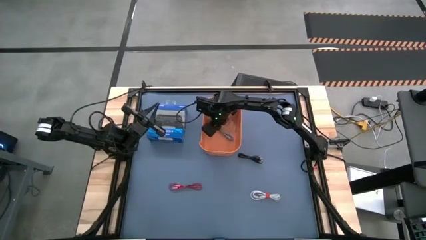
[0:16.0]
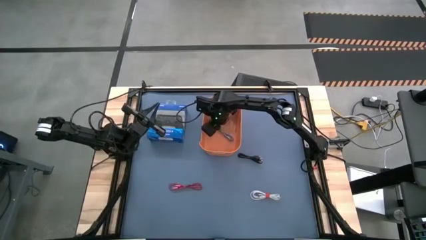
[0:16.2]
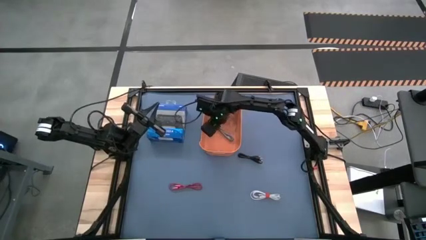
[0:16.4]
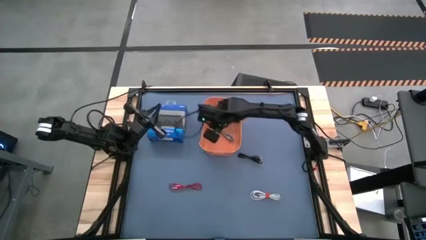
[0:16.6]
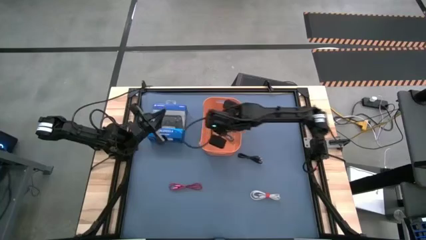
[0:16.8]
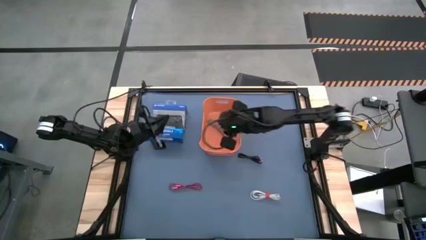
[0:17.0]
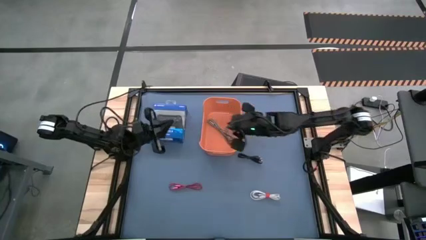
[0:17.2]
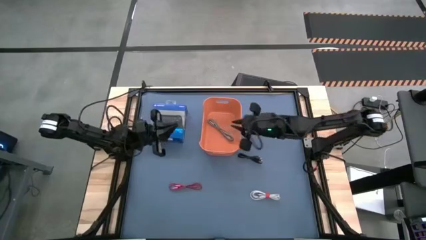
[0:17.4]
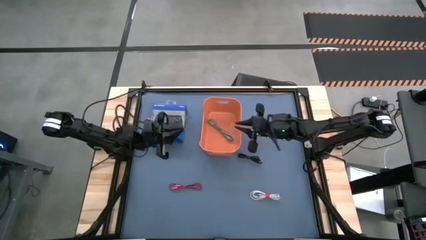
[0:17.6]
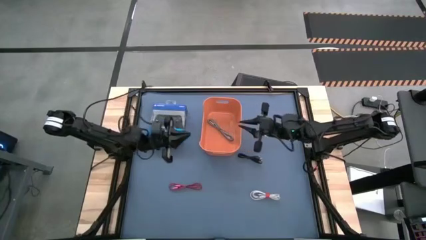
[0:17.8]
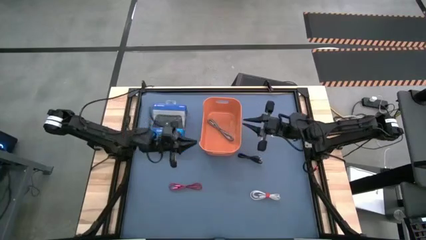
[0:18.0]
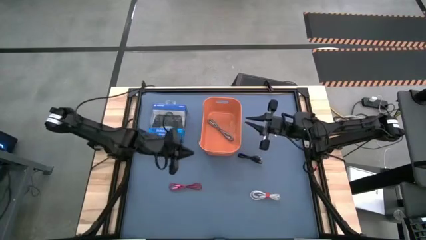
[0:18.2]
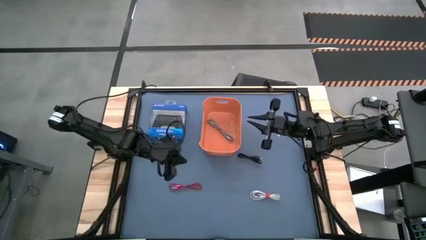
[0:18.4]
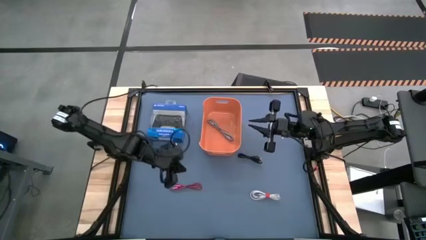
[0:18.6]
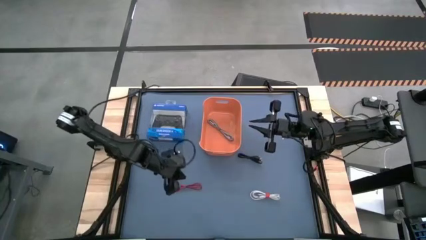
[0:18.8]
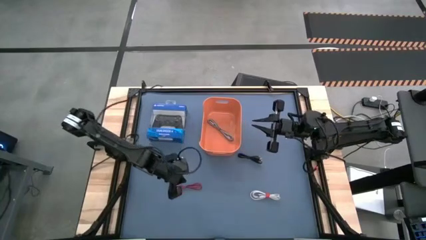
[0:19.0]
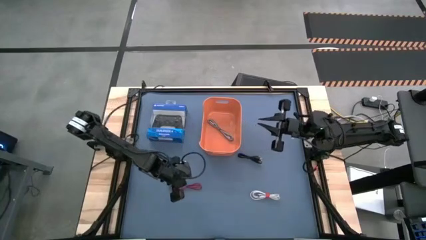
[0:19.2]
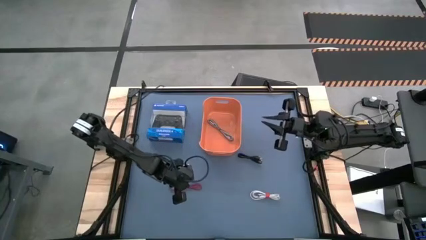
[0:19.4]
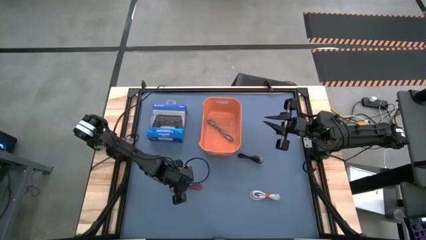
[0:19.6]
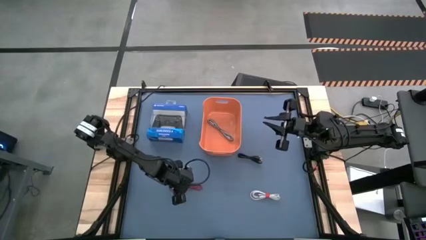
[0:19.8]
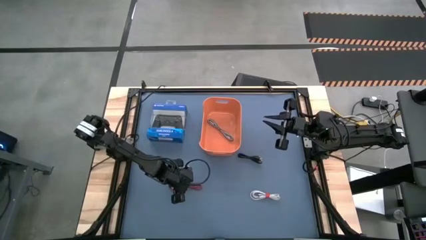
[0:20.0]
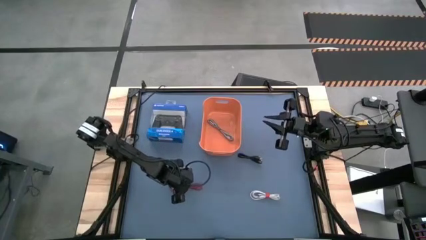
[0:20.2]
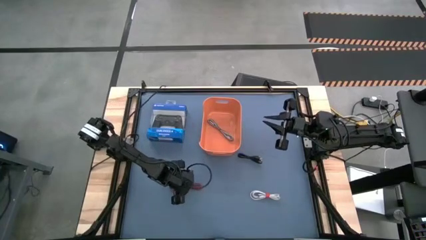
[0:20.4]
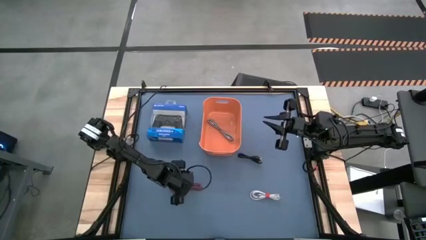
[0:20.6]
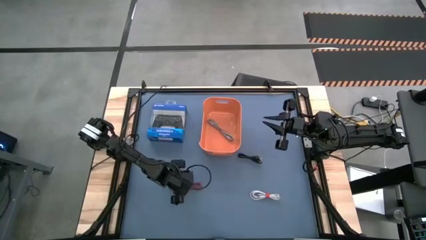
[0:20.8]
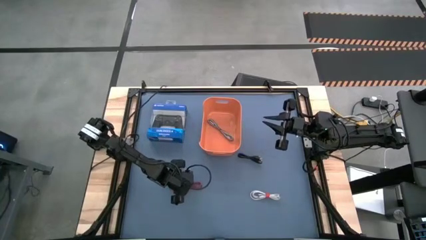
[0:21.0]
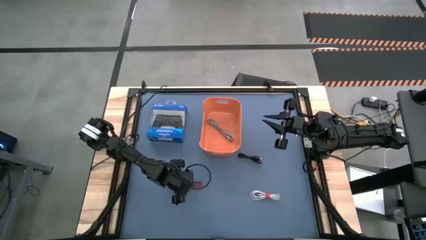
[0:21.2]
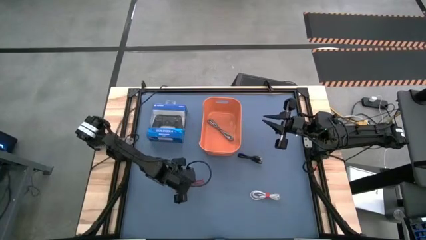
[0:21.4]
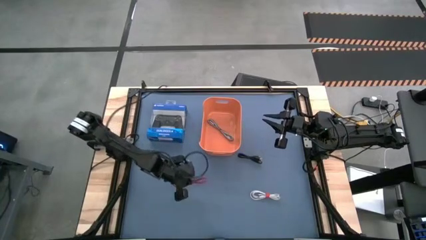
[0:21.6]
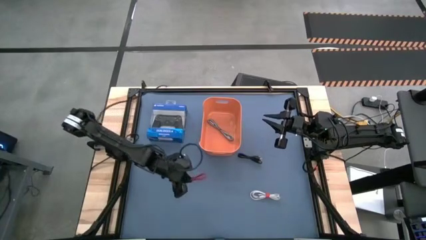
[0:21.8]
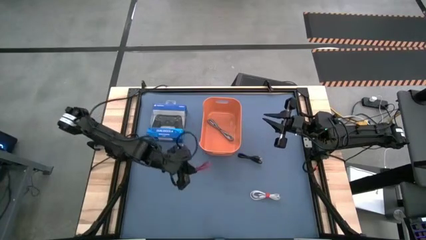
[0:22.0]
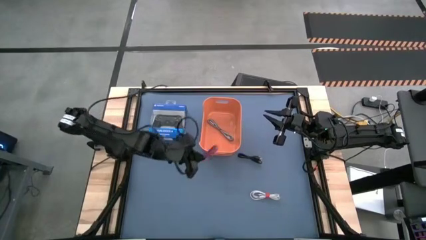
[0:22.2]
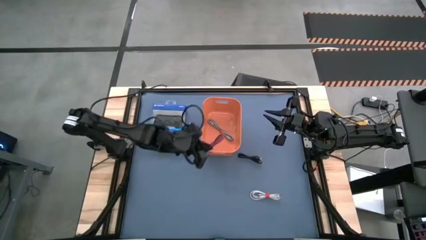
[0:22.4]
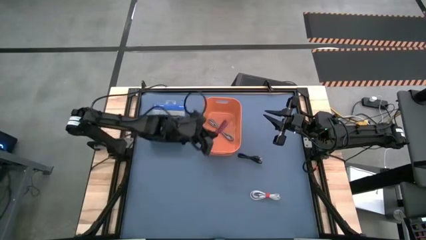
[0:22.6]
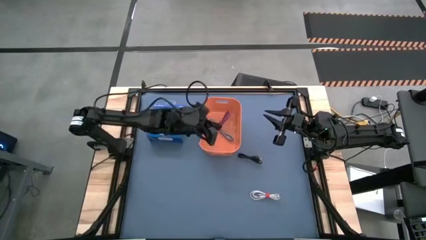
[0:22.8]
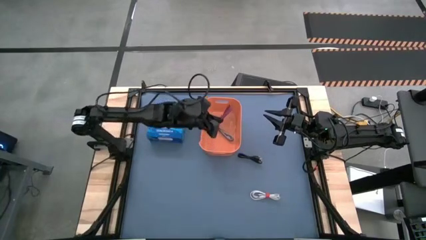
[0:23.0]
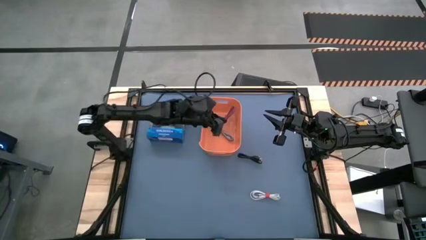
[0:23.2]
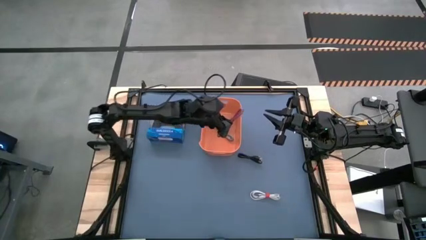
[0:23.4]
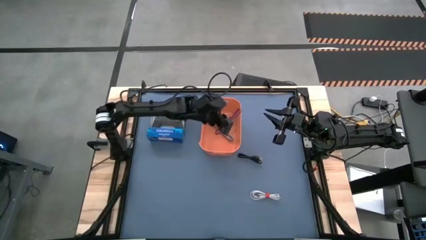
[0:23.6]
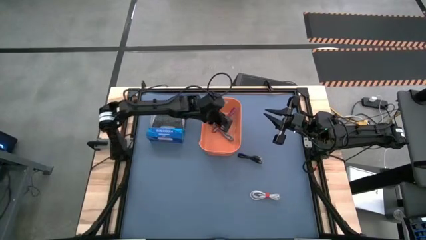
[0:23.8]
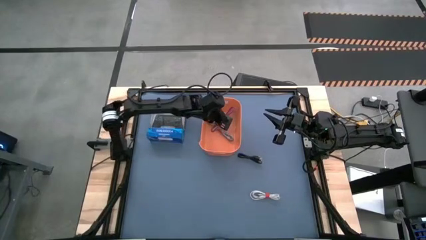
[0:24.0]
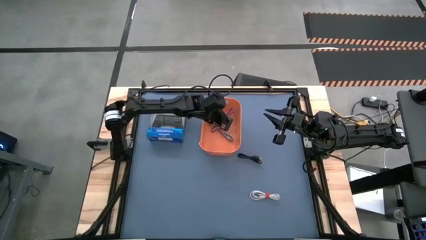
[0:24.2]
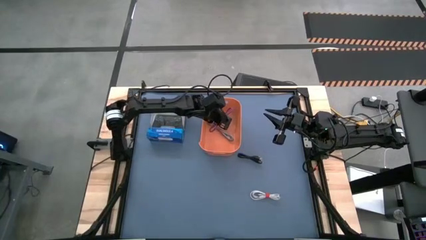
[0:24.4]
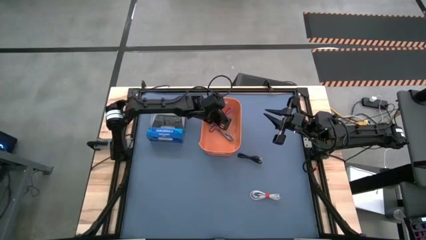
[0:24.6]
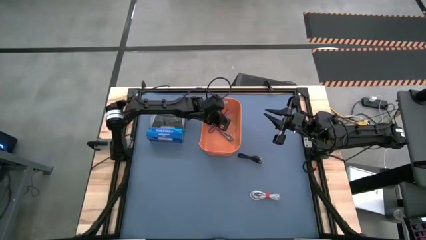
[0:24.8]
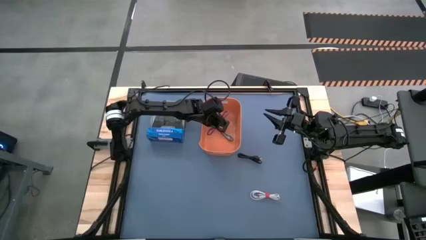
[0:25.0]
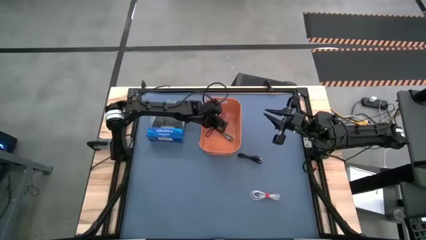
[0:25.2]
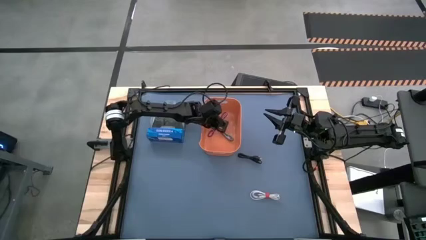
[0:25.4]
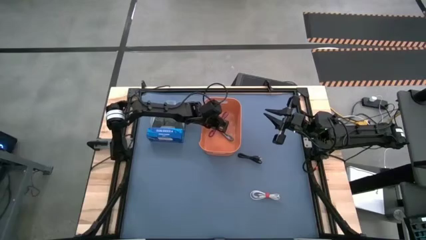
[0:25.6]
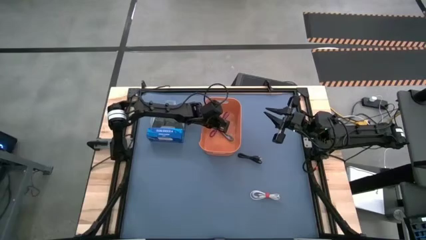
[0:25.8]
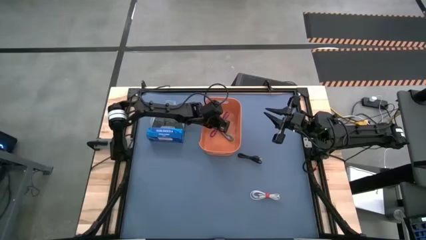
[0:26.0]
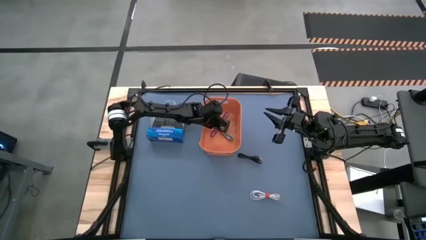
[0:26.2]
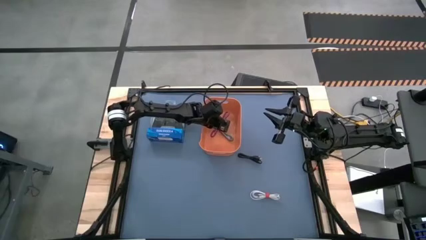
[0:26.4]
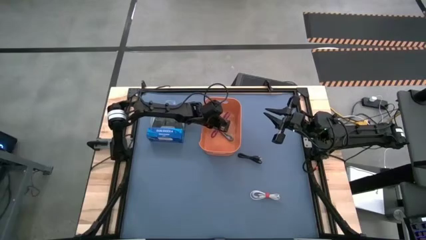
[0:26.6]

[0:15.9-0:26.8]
Task: Pick and place USB-C Cables
Put the red charger cable into the orange bin

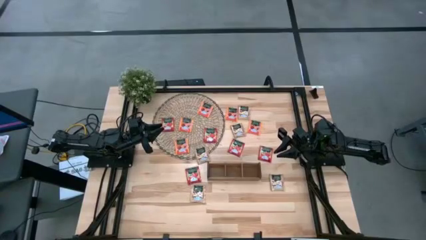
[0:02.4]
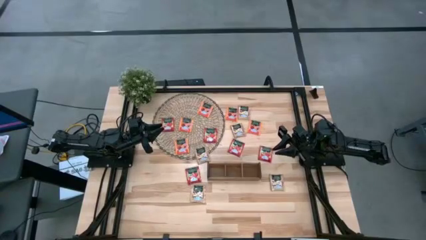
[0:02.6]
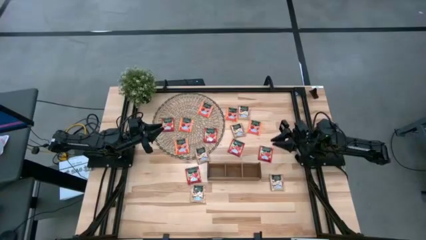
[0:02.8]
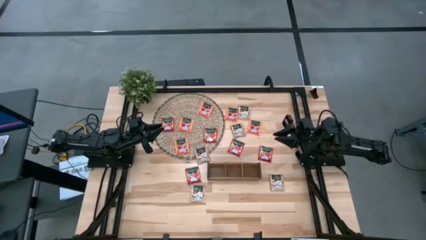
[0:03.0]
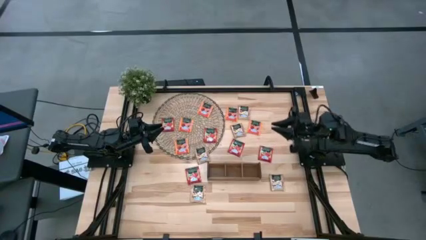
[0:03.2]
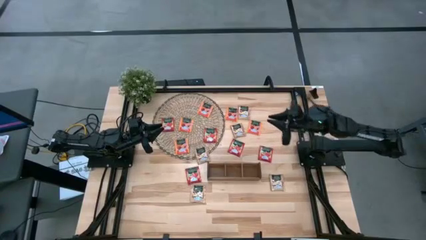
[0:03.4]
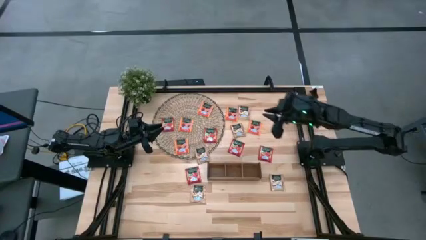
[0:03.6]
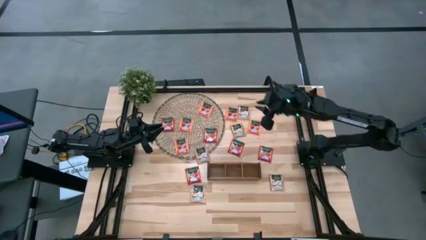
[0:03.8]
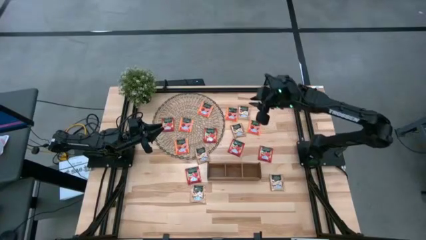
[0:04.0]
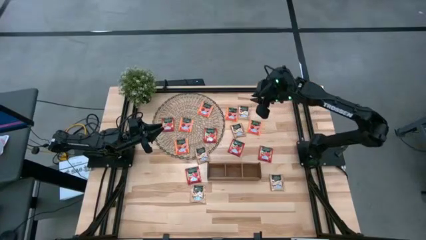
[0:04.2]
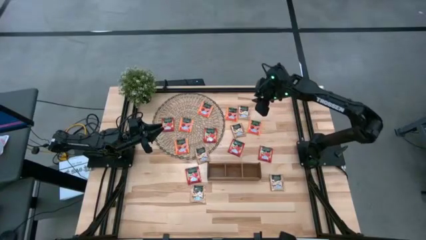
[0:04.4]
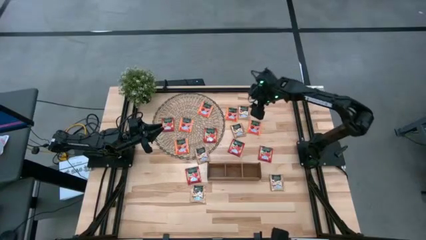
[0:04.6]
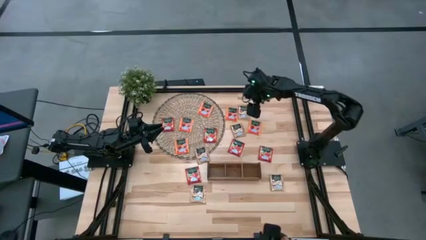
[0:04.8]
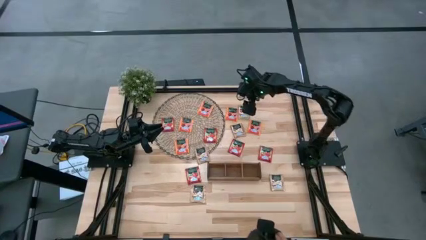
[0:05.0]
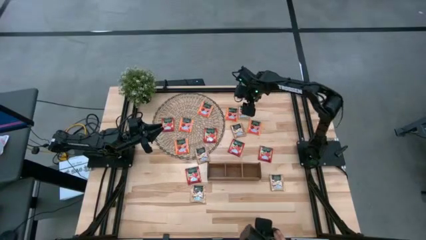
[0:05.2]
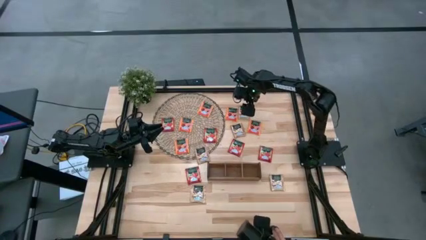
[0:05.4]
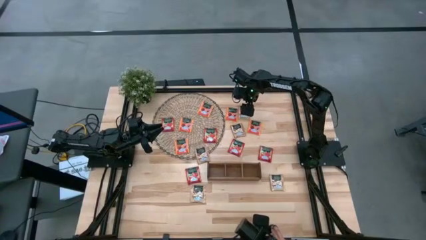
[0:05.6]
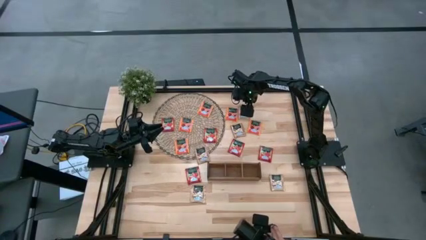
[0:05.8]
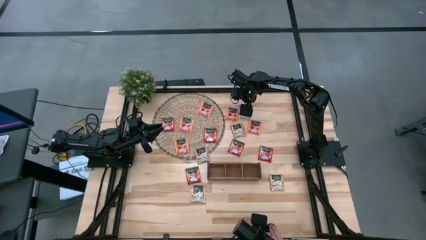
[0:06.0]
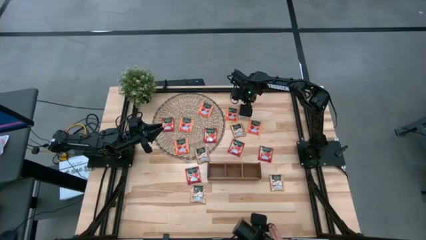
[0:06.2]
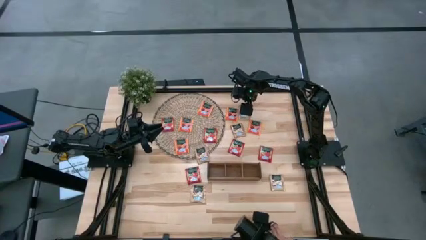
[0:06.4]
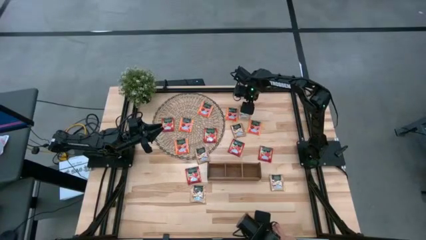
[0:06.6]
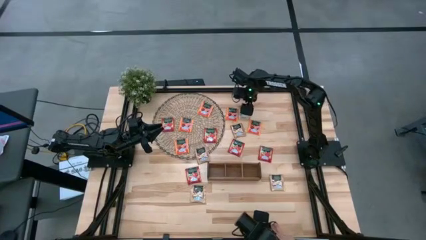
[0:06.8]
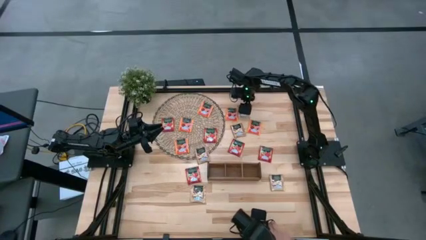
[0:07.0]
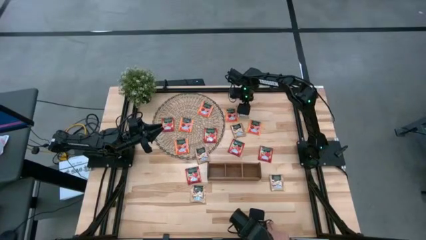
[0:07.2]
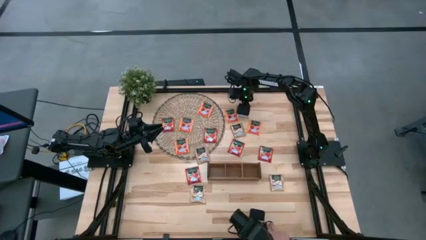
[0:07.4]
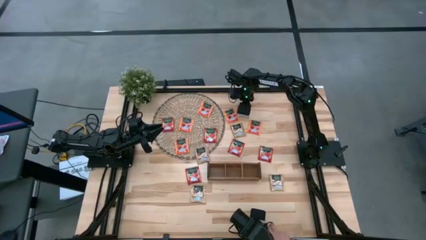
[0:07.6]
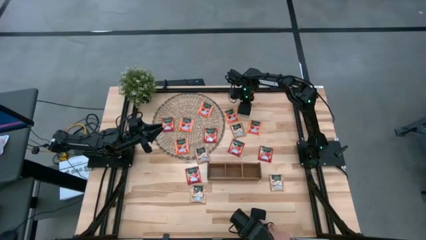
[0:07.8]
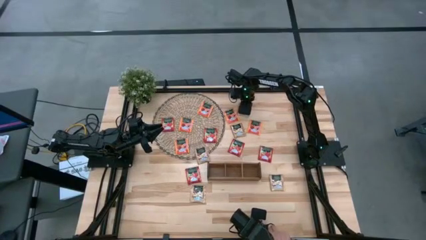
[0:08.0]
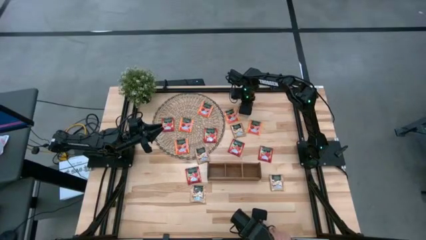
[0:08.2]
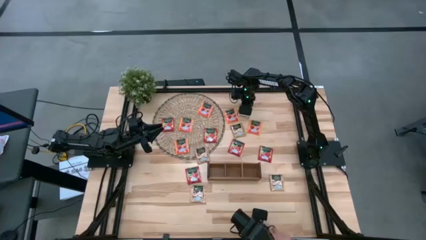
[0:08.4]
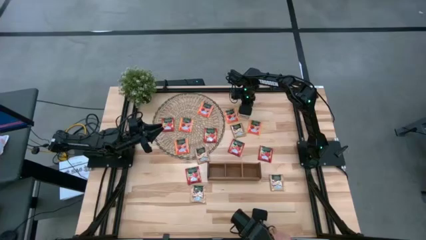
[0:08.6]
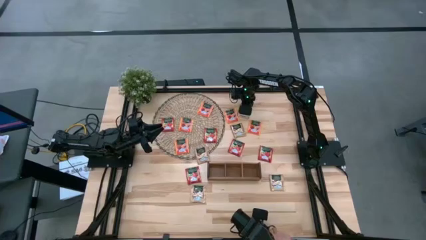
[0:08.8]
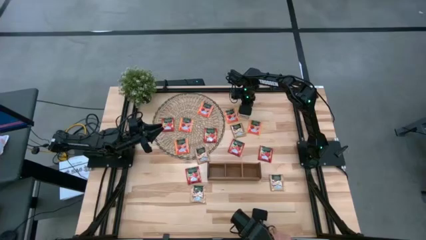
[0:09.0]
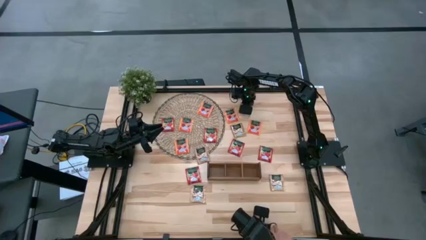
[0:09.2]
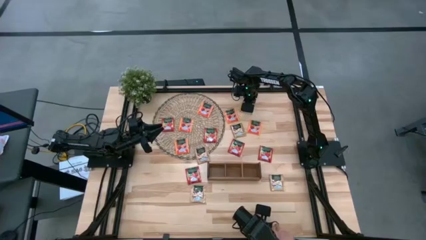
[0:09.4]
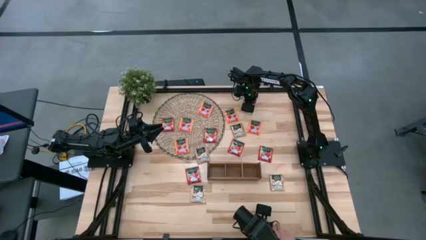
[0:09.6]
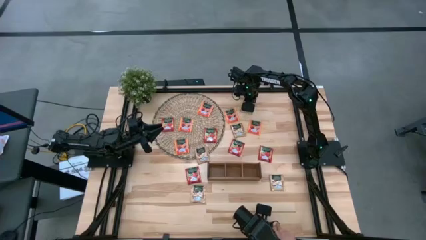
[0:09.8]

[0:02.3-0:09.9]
Task: Pick & Place Tea
Put the brown tea bag into the right slot of the wooden organizer
